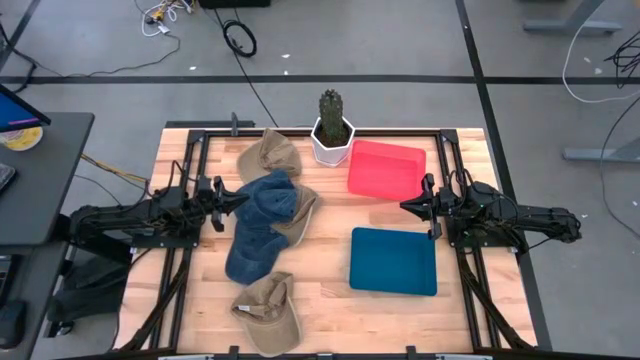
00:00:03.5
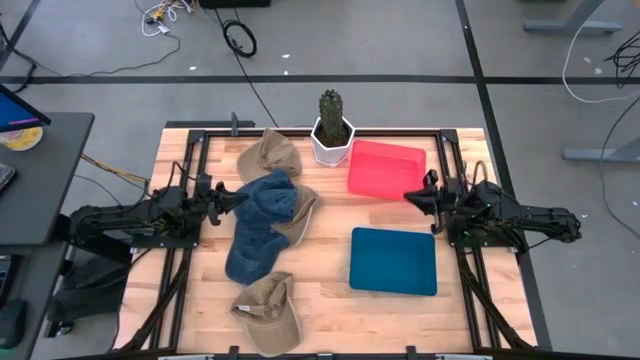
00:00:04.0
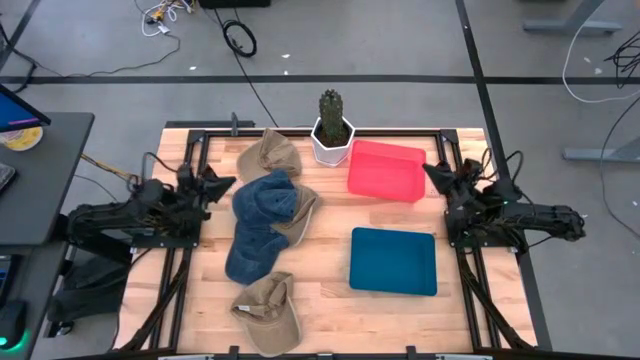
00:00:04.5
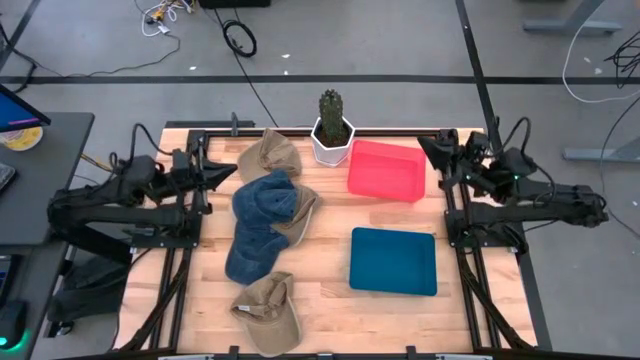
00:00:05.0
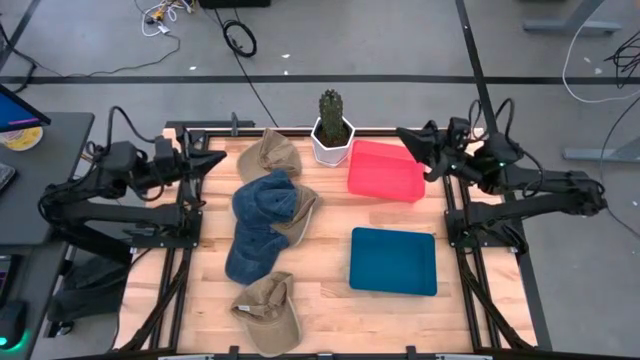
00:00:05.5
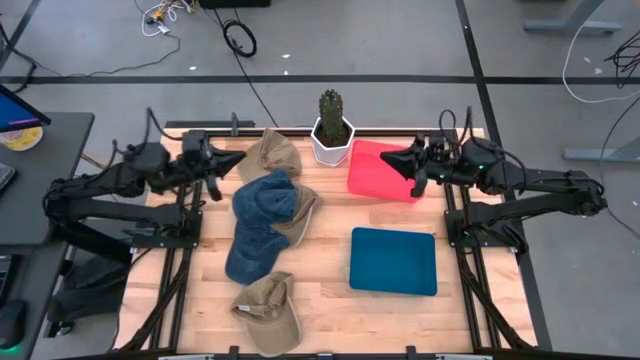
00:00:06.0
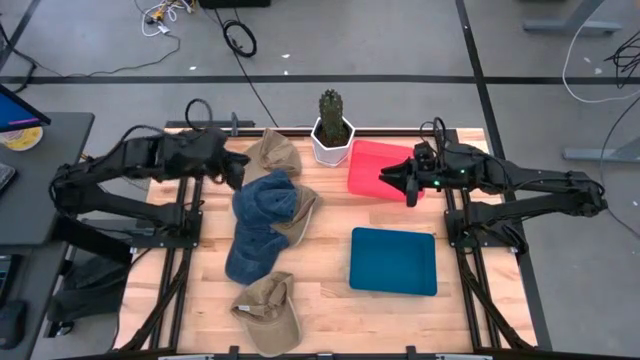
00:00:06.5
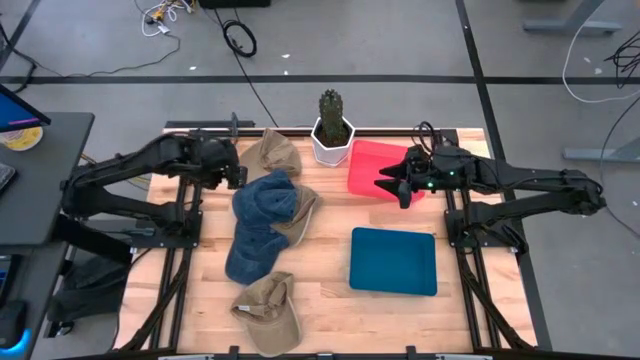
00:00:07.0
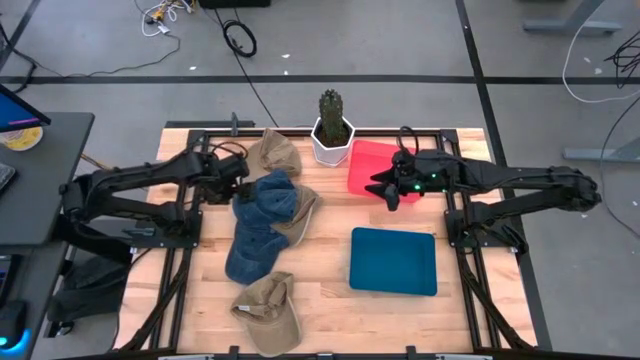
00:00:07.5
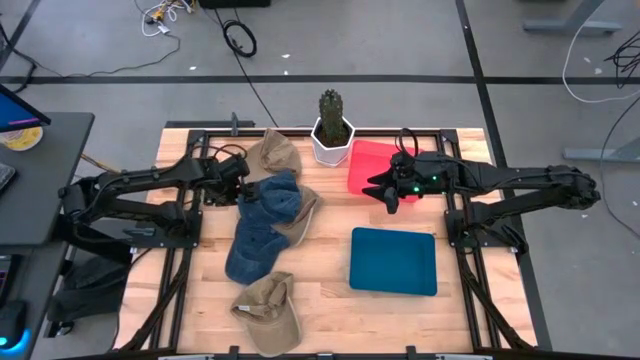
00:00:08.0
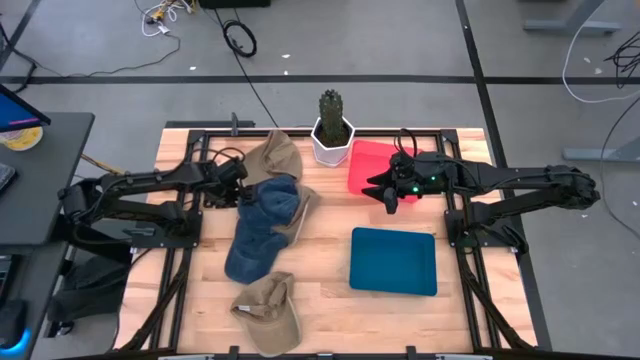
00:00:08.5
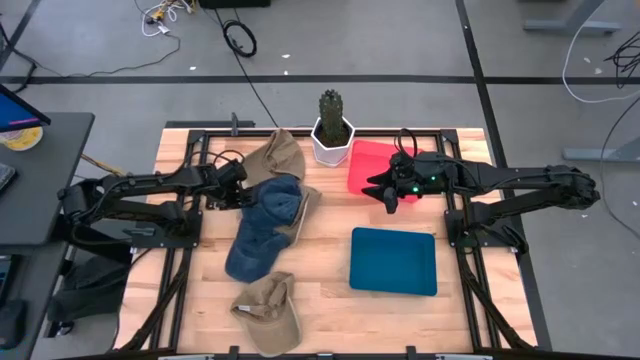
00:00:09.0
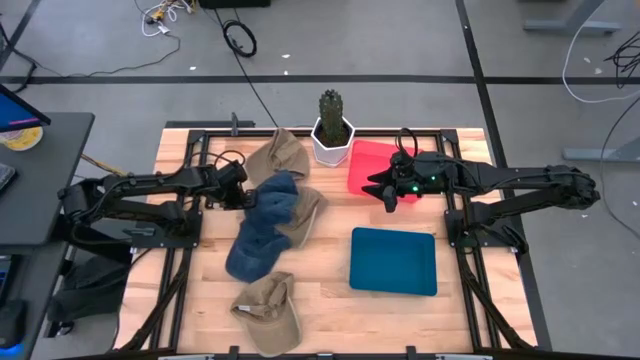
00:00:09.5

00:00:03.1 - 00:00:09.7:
Task: Pick & Place hat
Put the top blue cap into the red bin

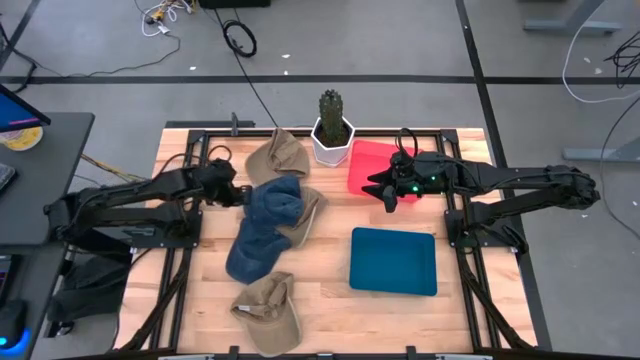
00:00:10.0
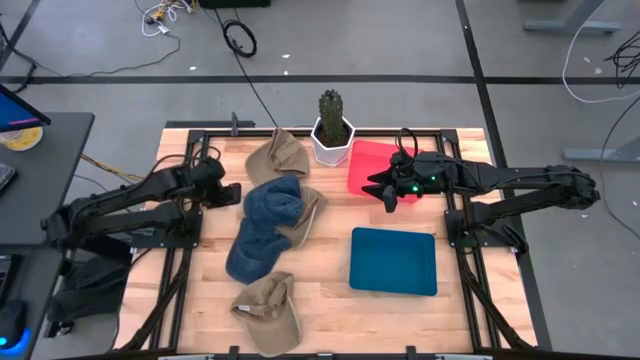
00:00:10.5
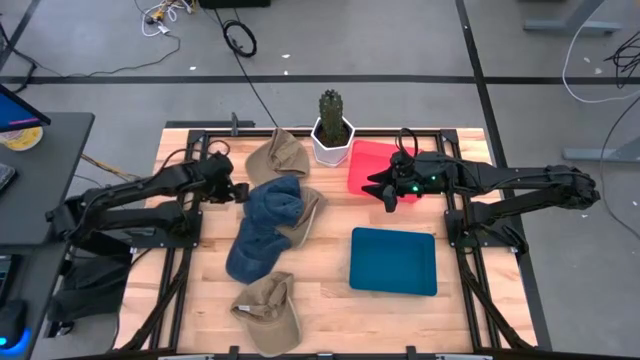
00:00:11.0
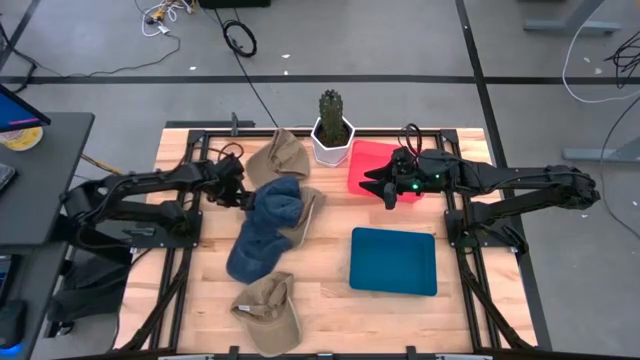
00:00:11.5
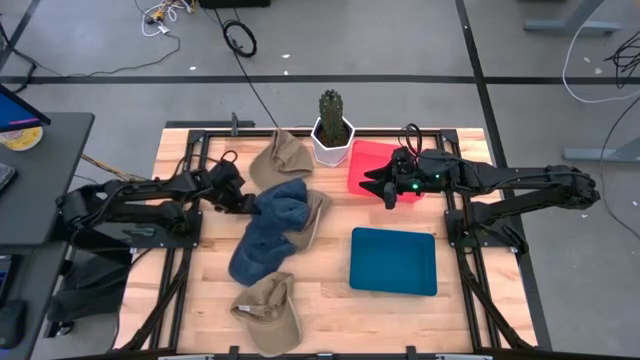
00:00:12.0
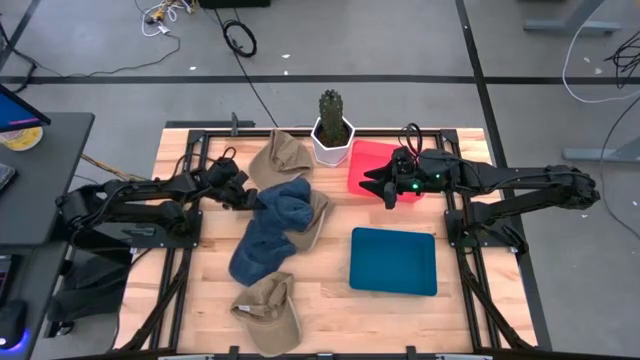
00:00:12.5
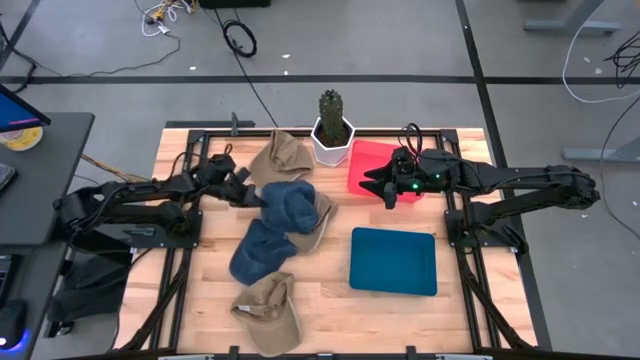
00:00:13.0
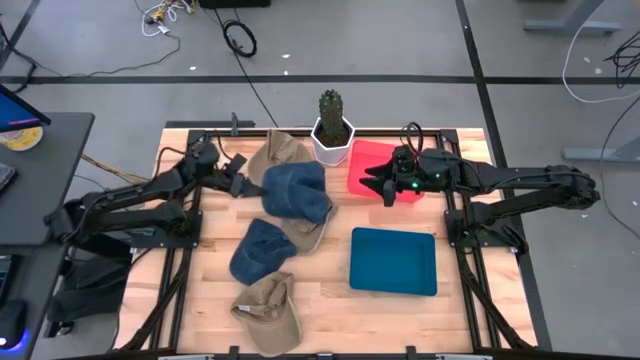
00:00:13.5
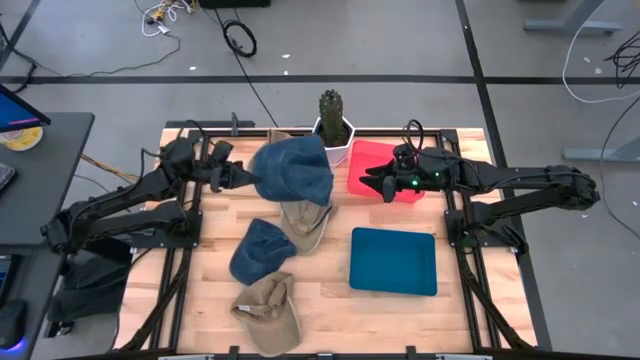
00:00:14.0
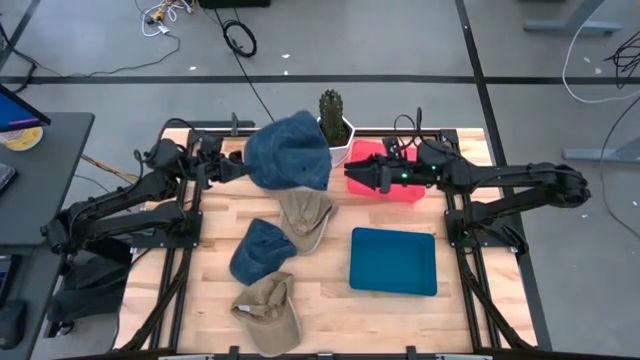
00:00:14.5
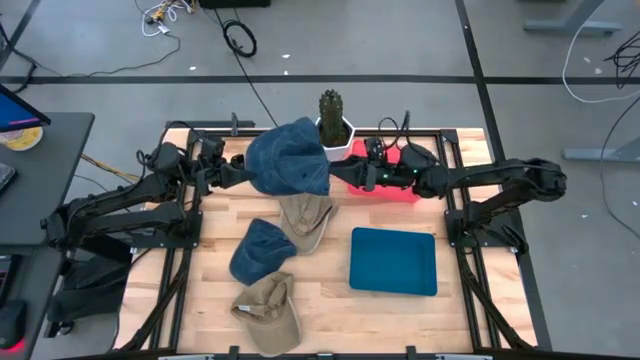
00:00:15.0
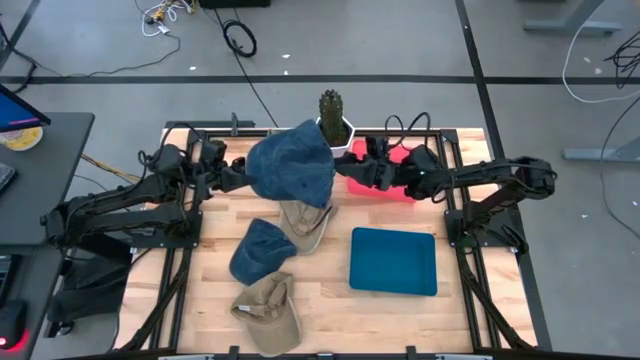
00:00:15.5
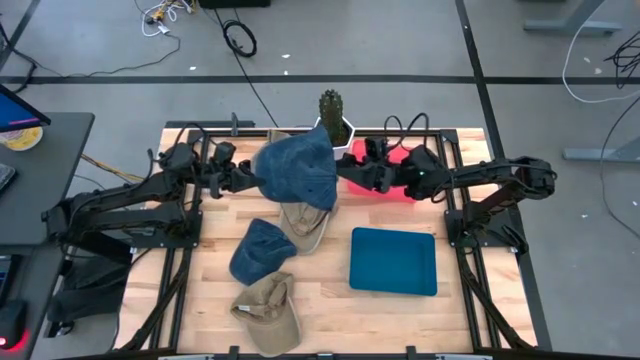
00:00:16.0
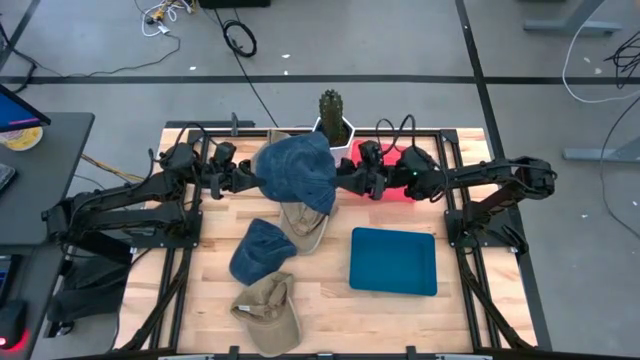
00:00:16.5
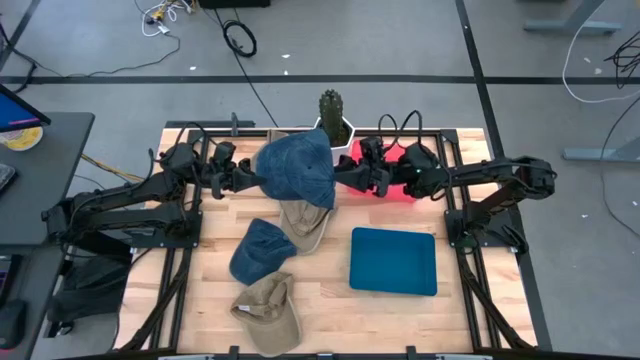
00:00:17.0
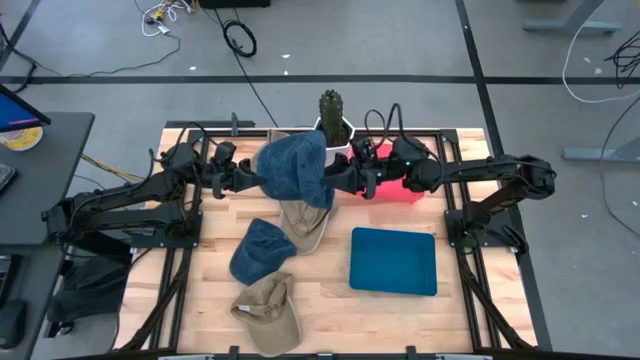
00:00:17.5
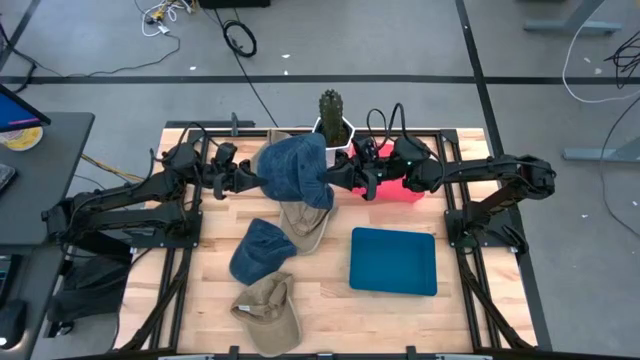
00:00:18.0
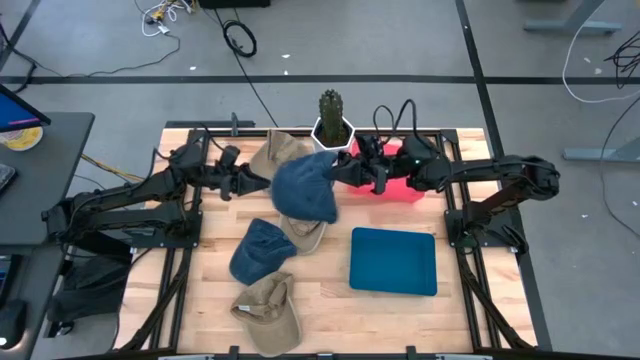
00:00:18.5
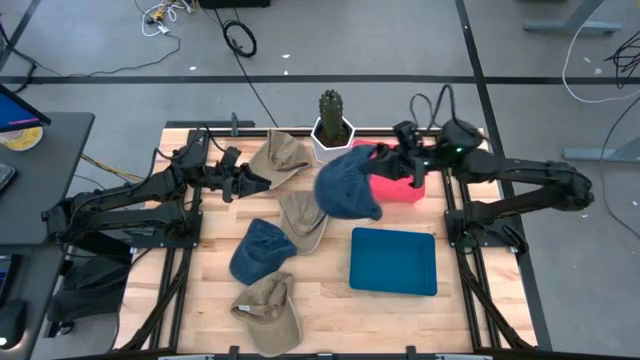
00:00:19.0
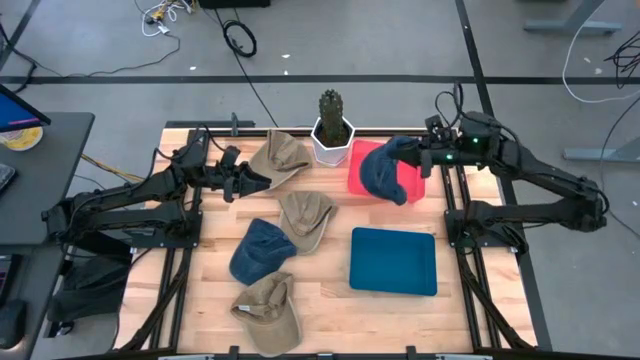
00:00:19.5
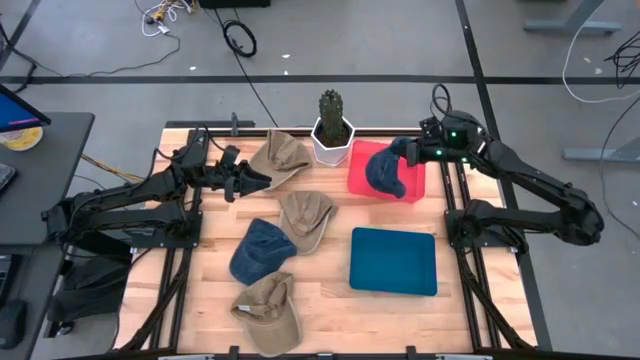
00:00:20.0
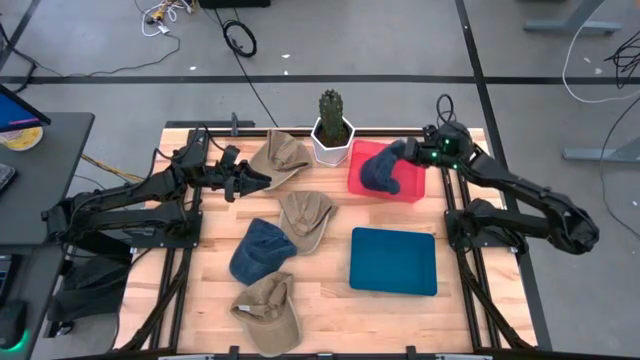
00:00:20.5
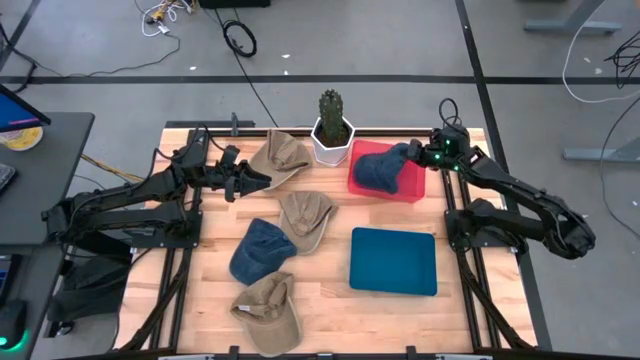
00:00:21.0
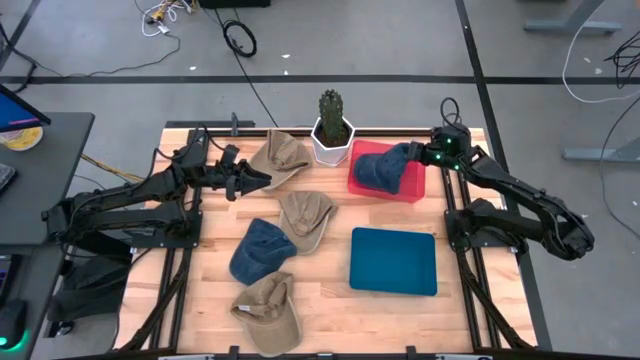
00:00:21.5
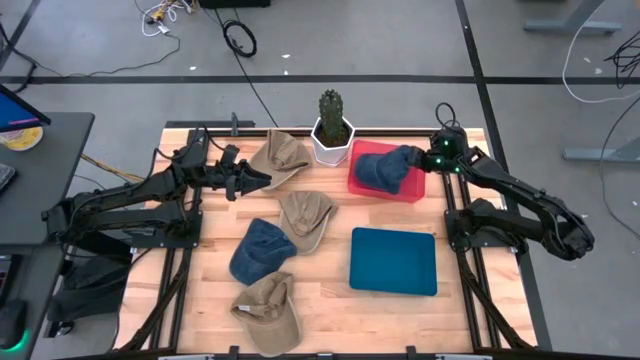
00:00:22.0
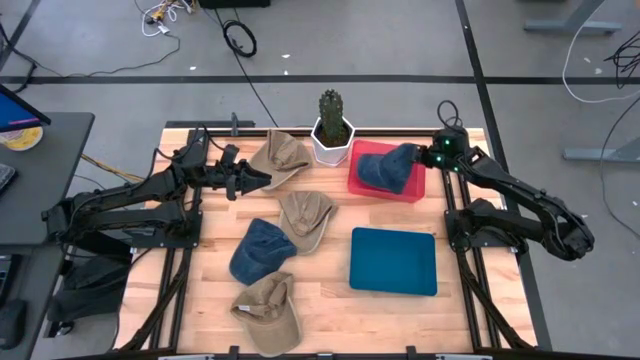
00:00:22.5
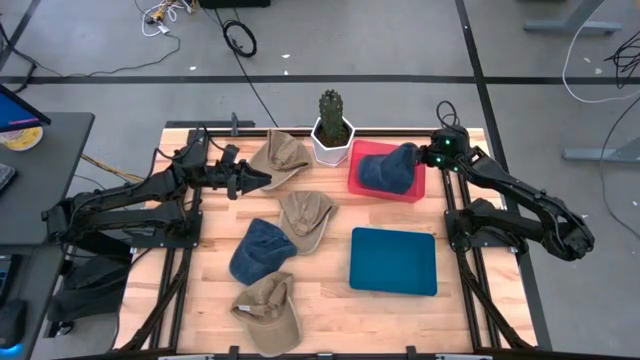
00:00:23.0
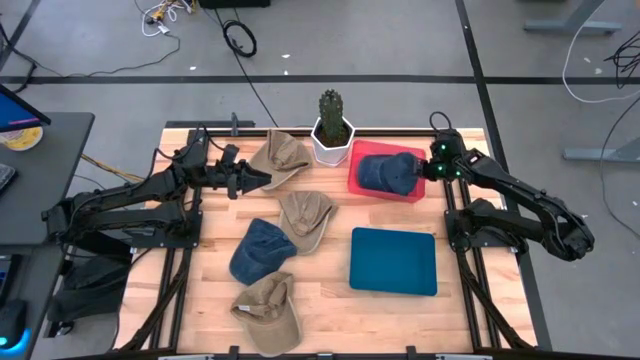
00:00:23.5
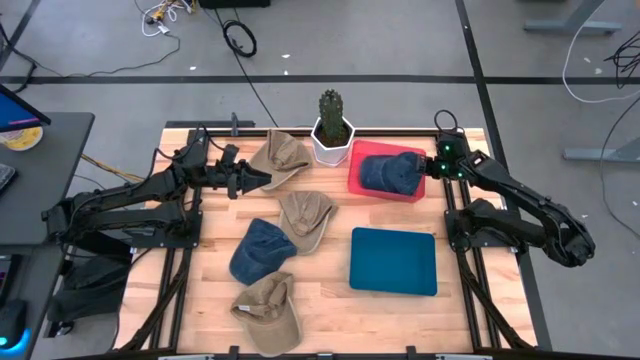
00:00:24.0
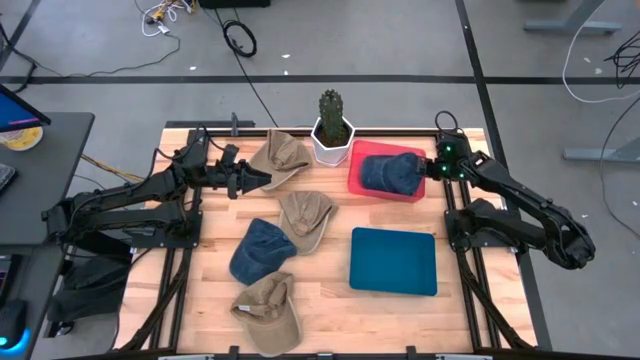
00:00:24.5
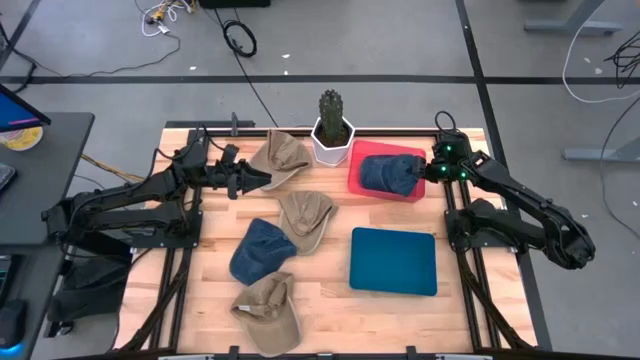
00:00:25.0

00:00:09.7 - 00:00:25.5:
Put the top blue cap into the red bin
